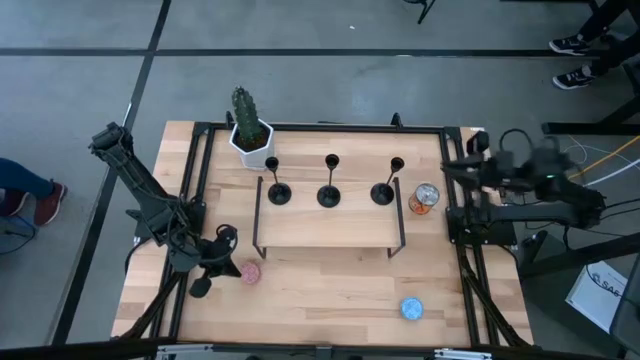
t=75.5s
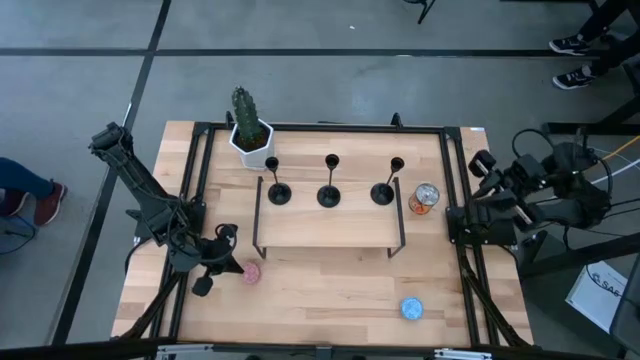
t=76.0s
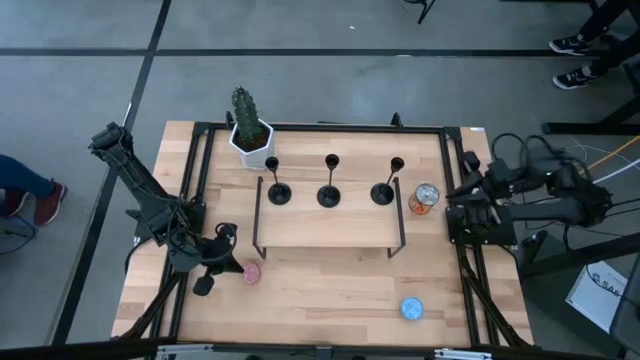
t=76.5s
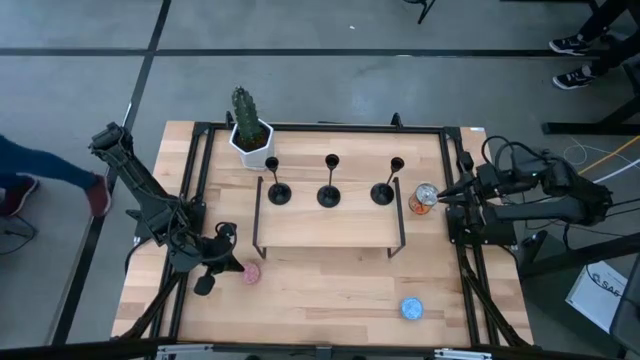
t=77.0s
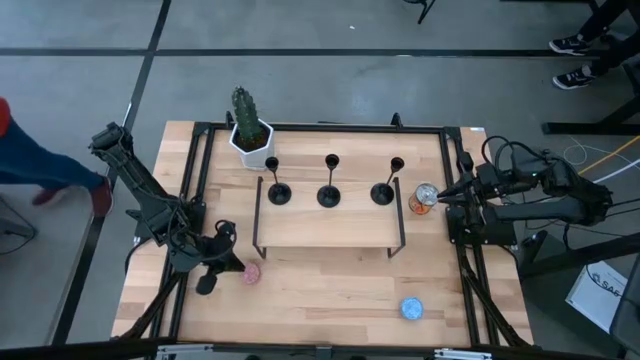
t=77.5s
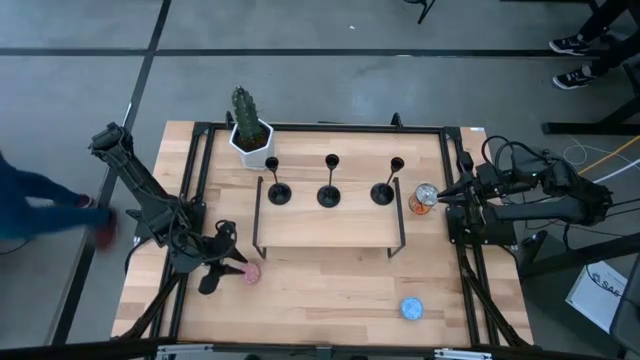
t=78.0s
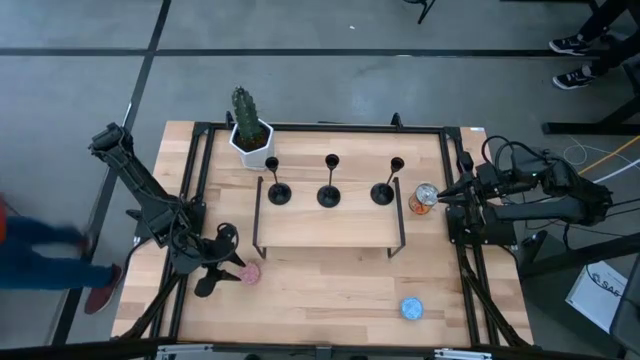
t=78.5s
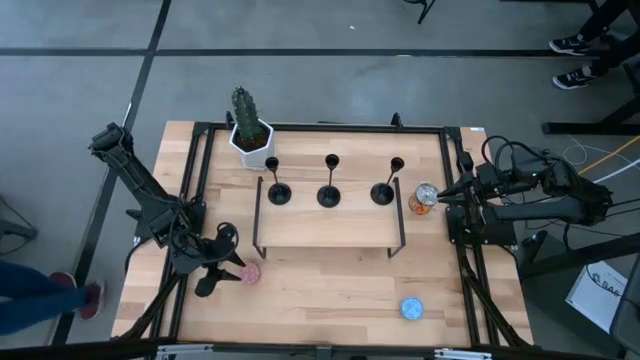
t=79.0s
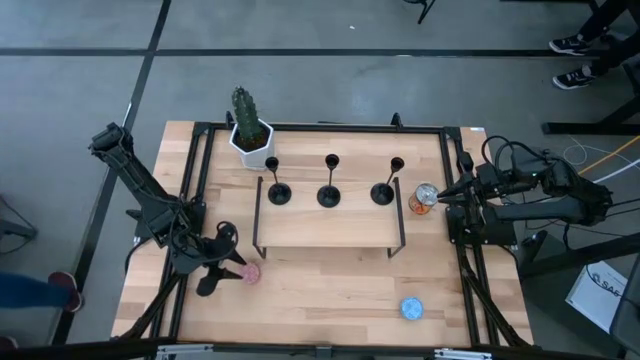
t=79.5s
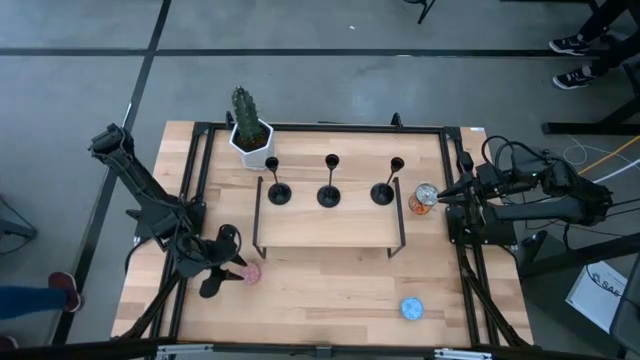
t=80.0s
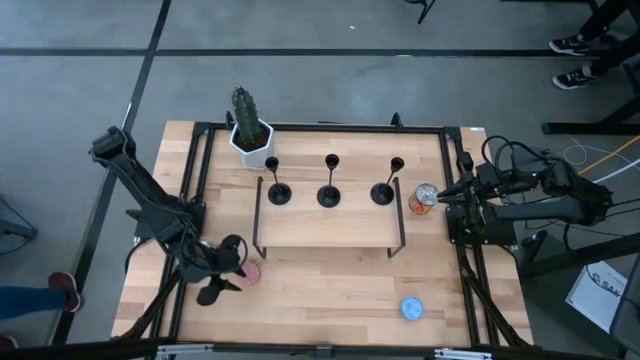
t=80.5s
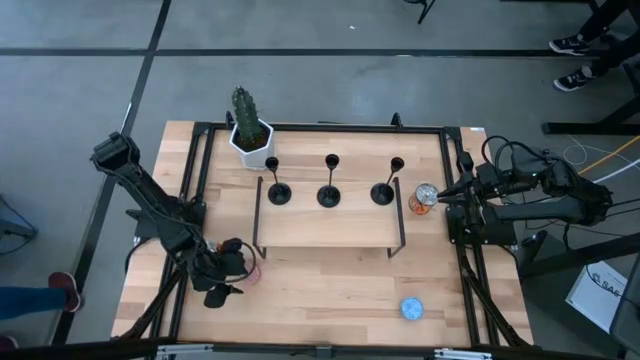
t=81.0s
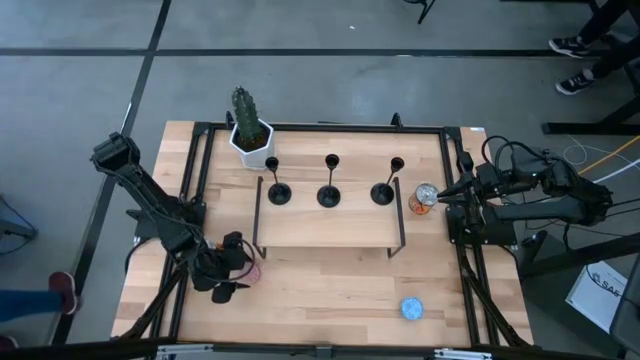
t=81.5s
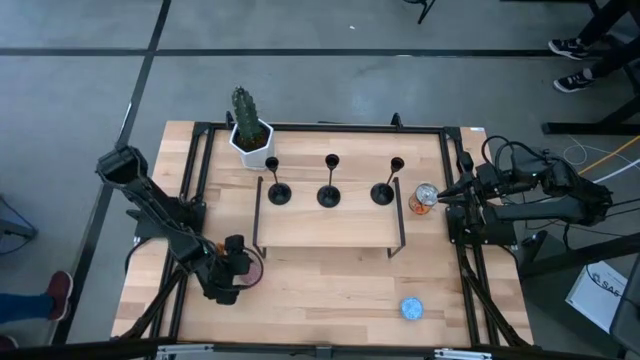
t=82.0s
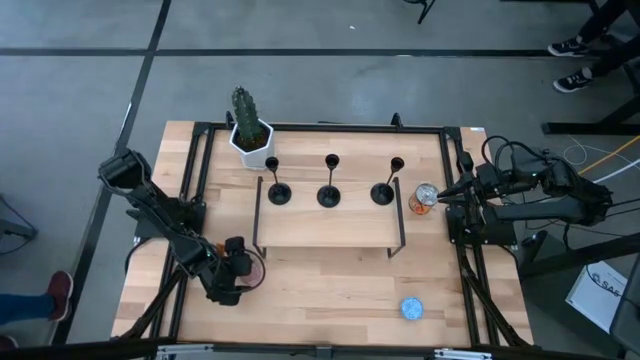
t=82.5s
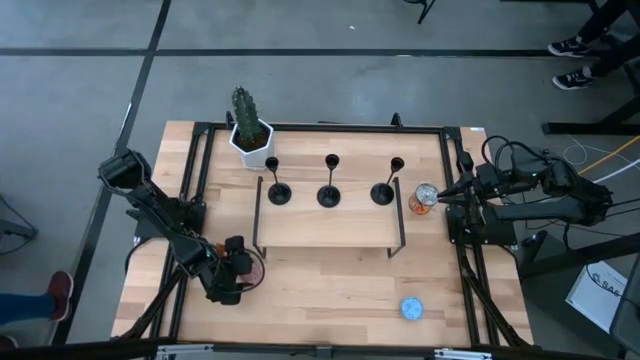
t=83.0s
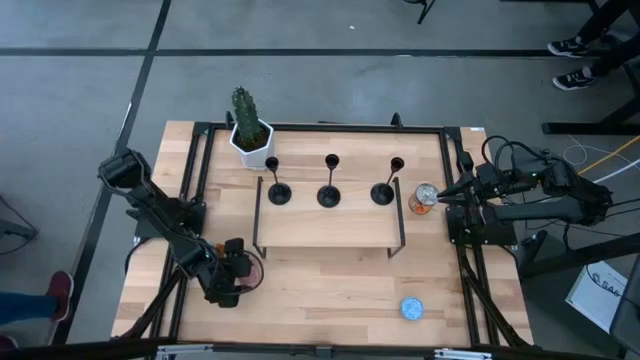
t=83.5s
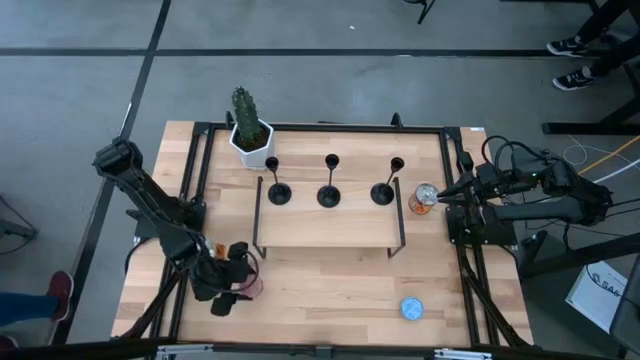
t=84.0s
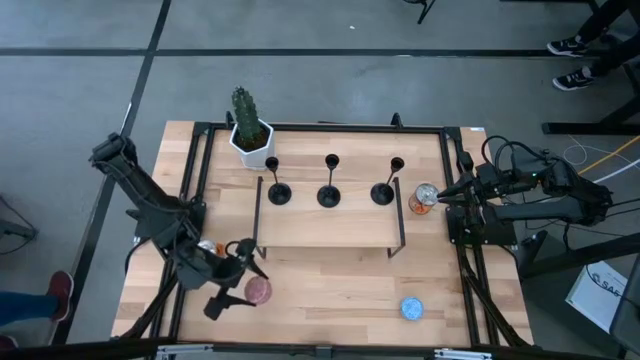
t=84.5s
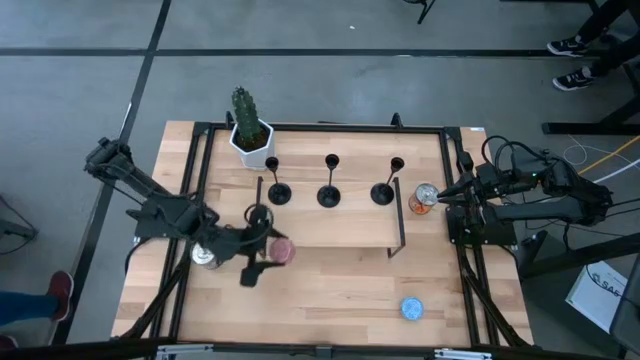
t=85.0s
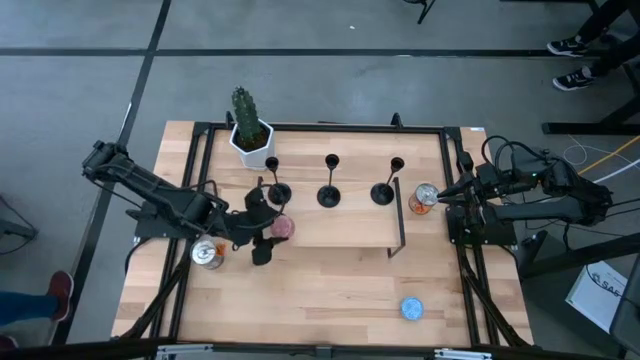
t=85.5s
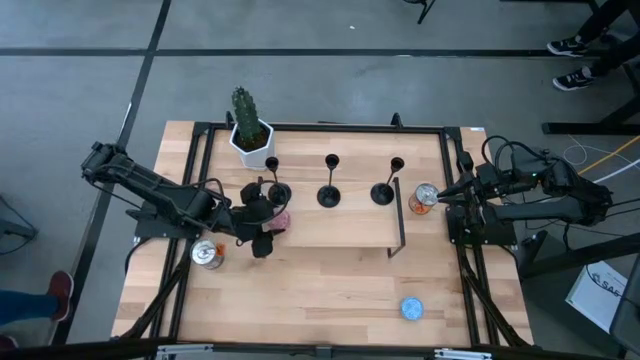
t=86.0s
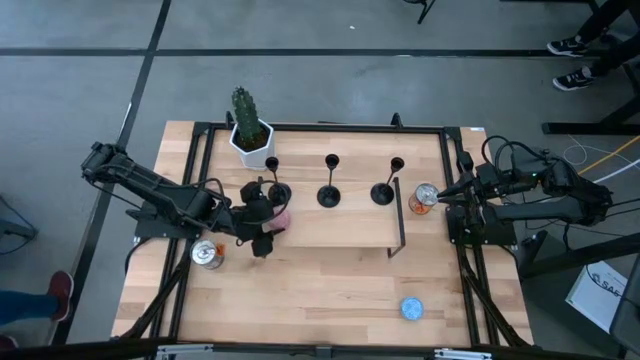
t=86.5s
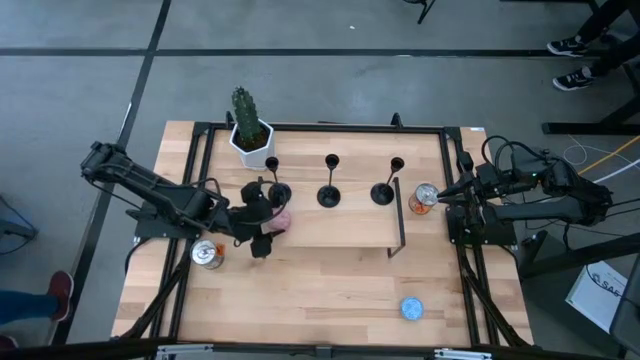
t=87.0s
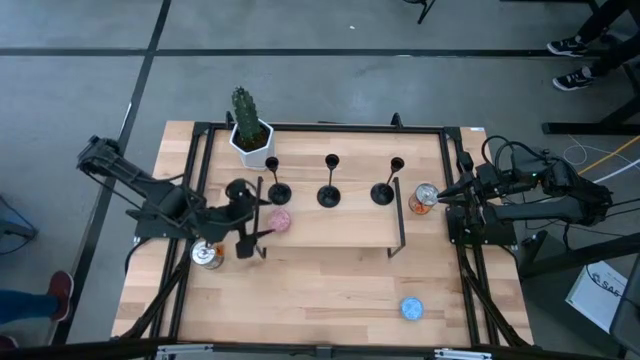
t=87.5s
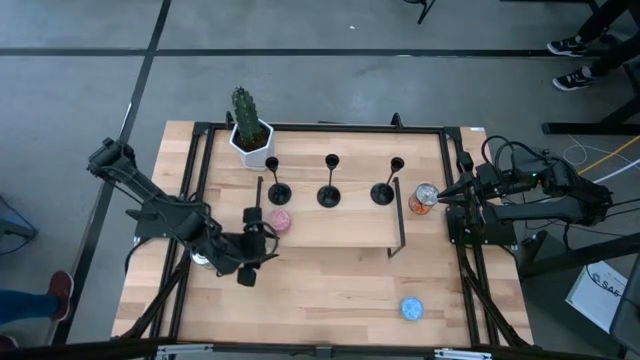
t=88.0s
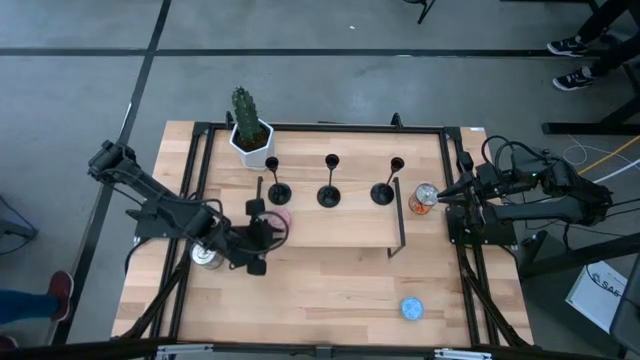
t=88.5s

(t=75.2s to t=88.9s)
Task: Pick & Place candle stick holders
Put the red scented candle on the shelf

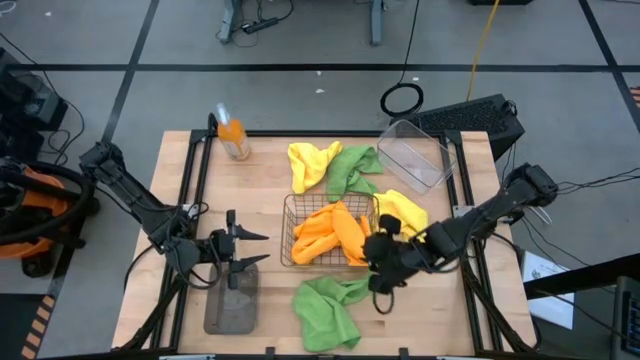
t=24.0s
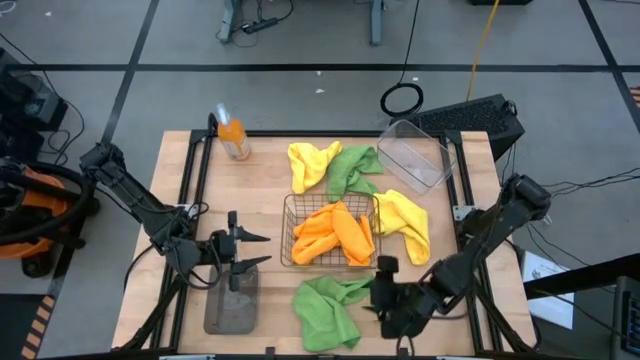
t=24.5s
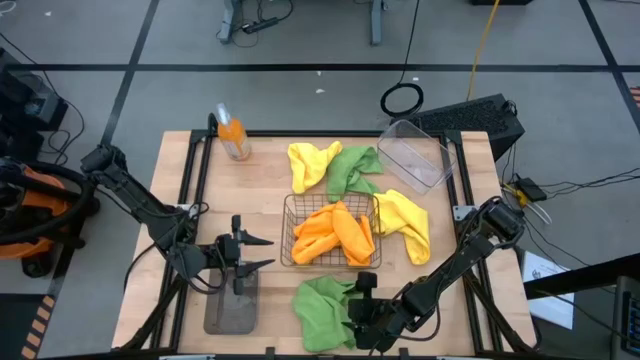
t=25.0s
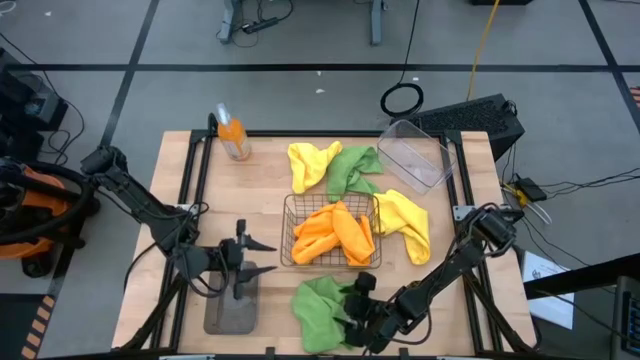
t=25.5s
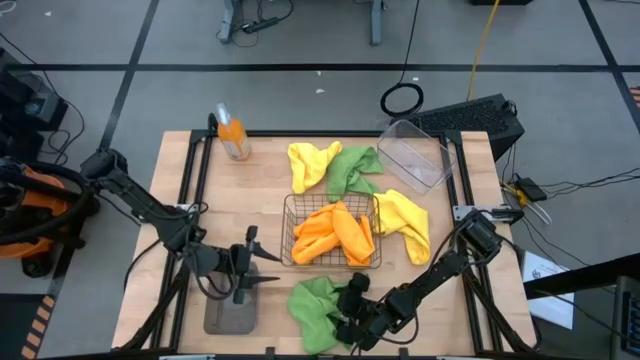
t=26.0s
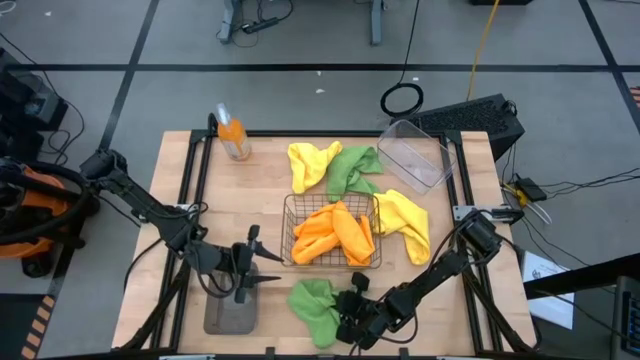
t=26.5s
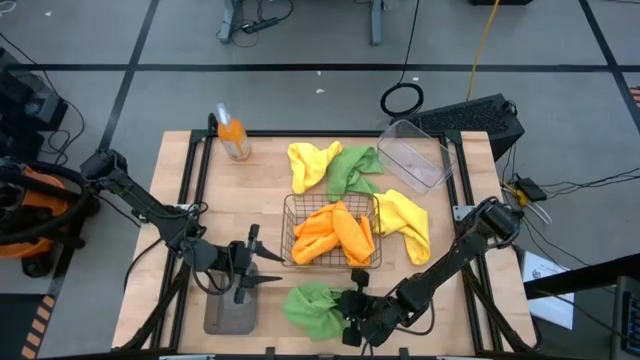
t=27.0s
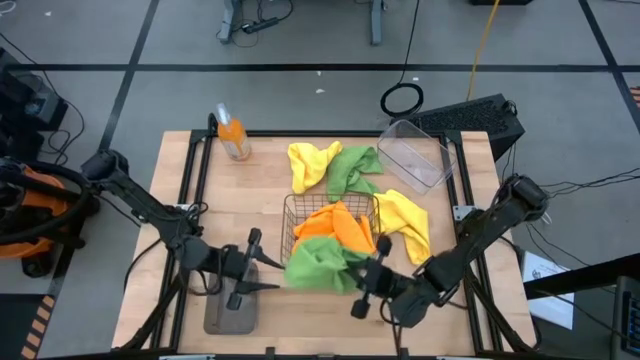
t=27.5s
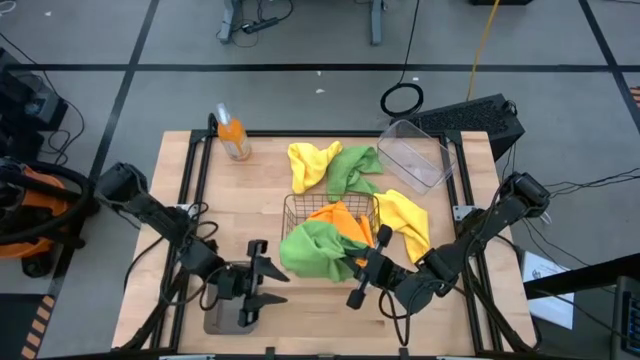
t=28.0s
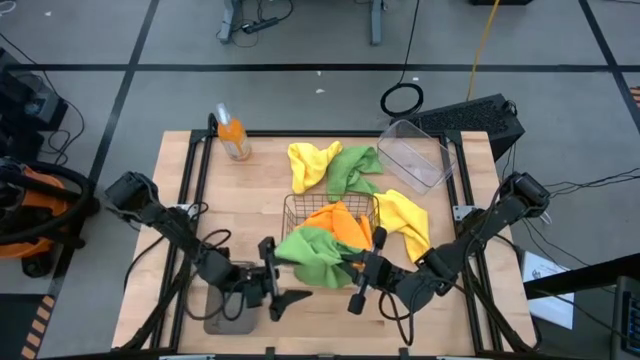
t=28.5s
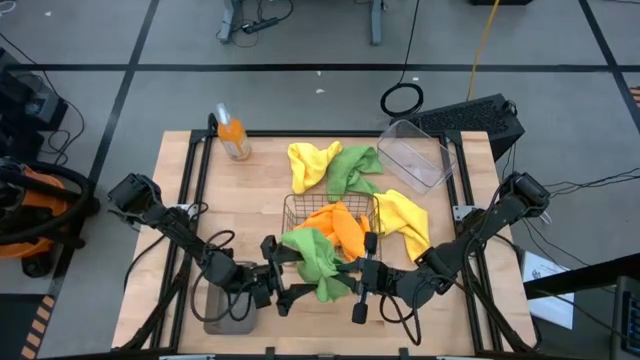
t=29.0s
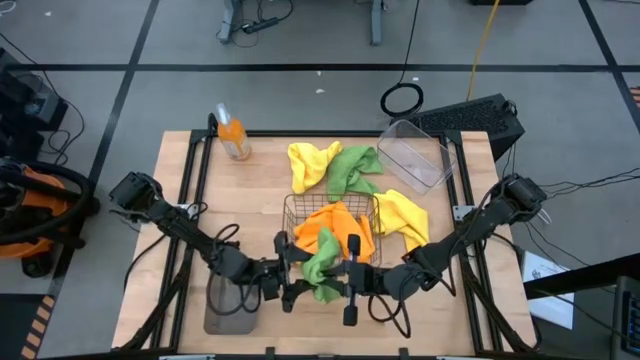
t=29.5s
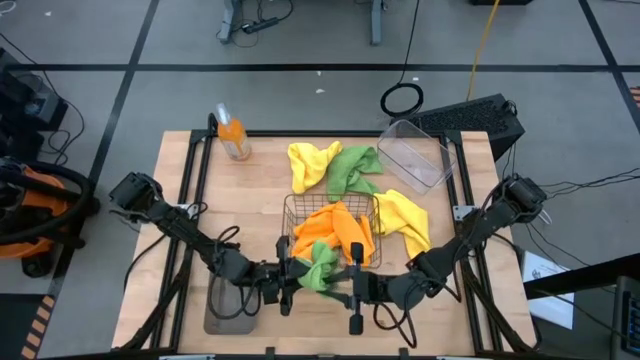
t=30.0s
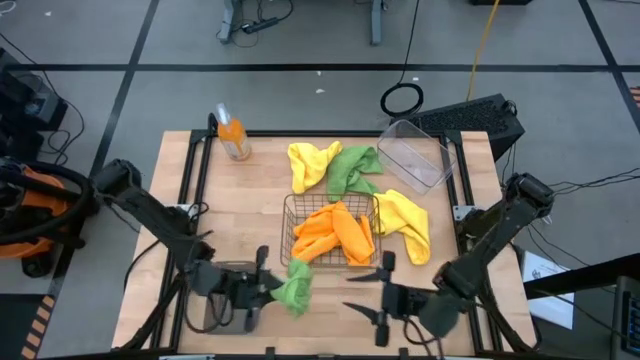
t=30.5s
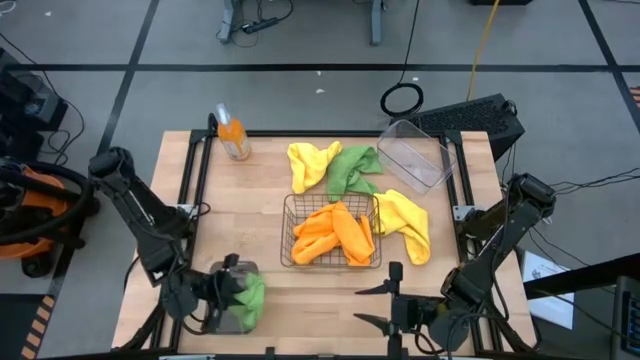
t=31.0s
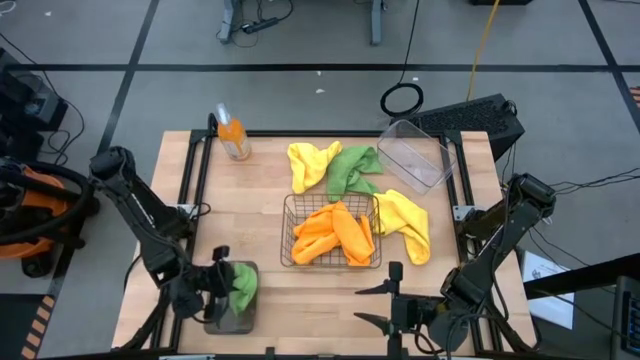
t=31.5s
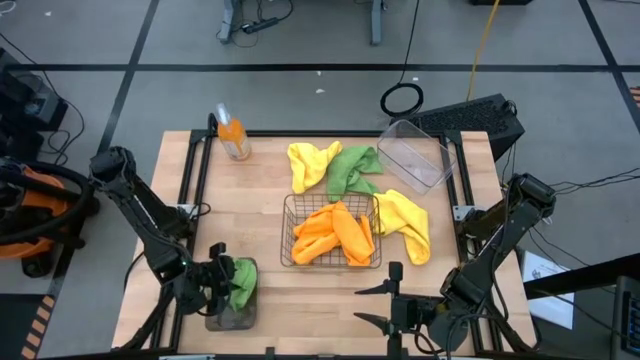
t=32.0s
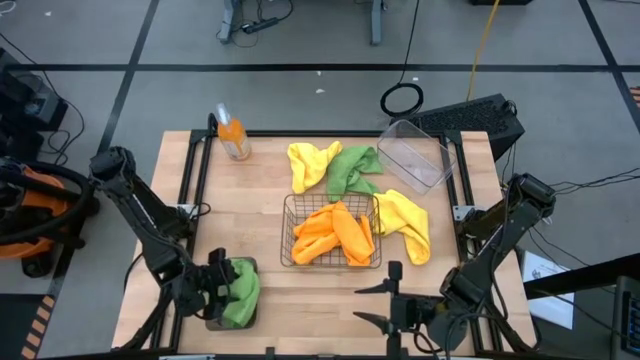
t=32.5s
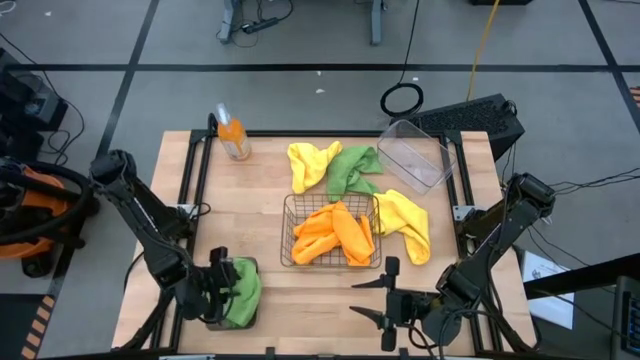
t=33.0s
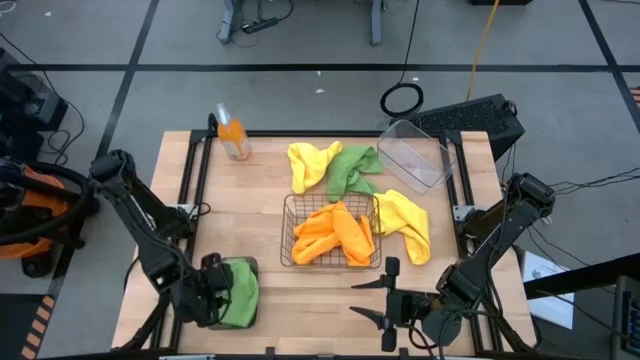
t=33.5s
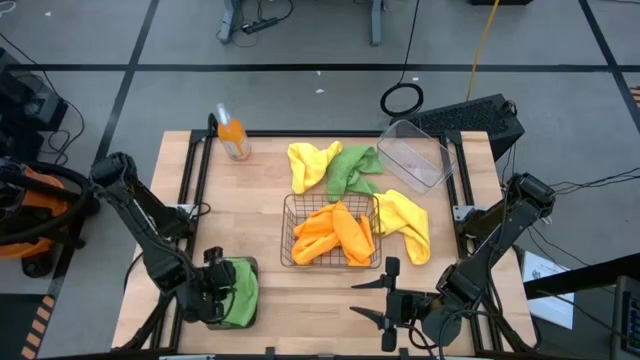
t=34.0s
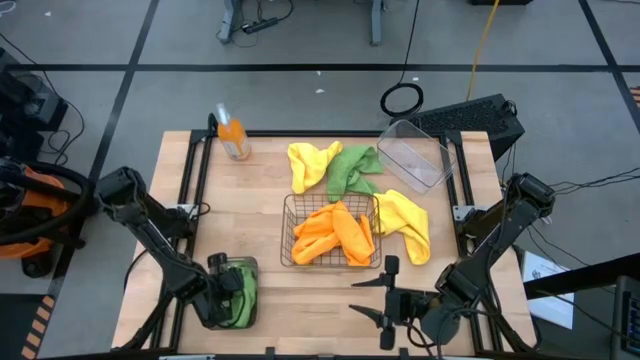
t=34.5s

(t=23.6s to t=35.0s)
Task: Sort microfiber towel by color & place in baskets
Put the bottom green microfiber towel into the gray transparent bin
